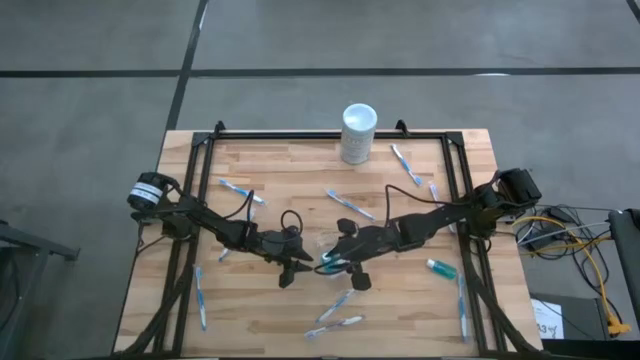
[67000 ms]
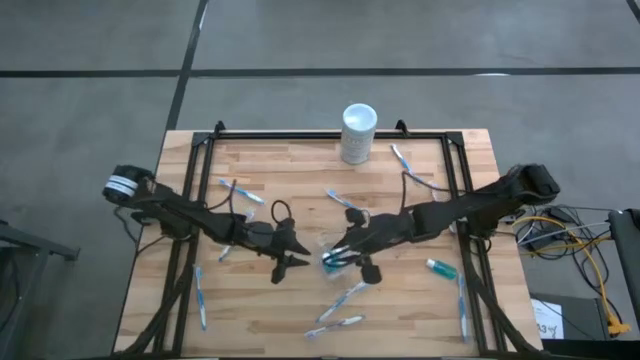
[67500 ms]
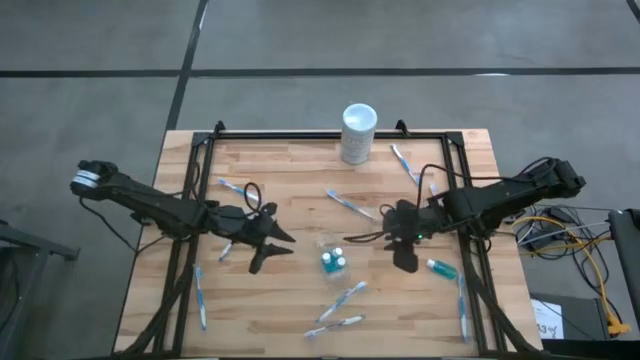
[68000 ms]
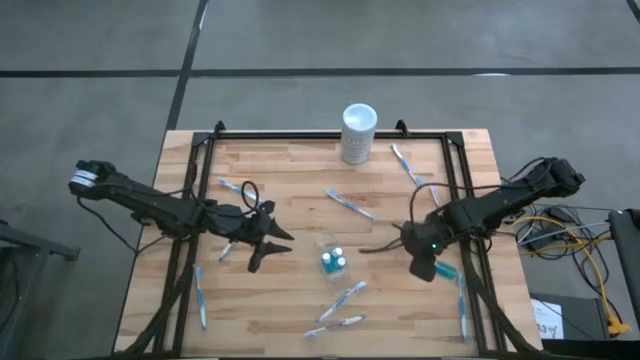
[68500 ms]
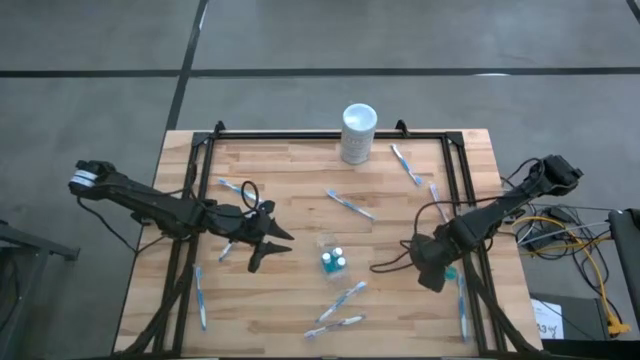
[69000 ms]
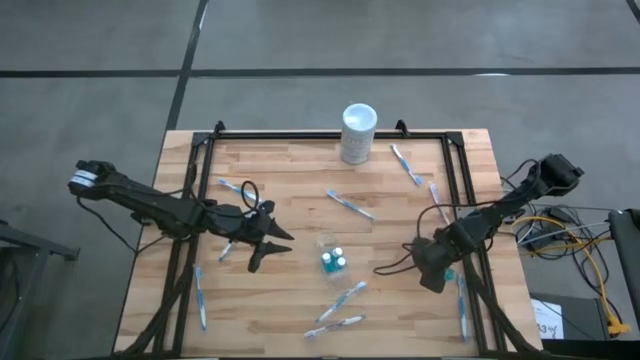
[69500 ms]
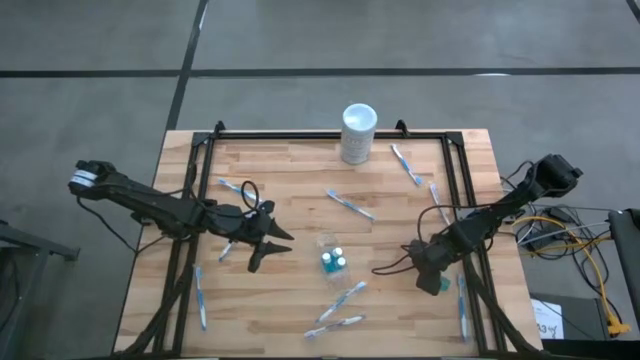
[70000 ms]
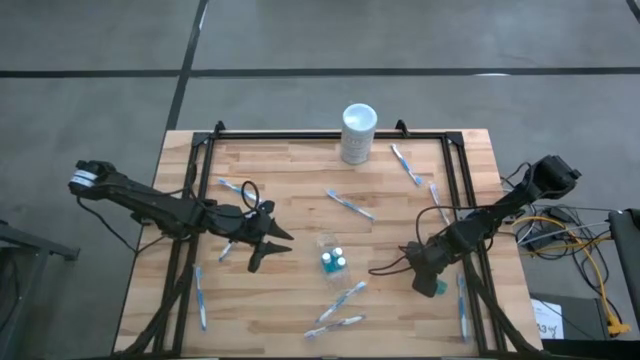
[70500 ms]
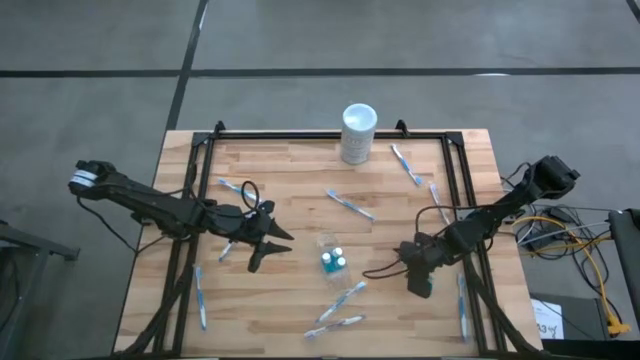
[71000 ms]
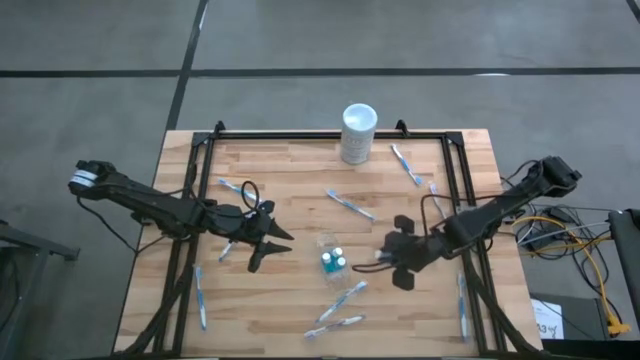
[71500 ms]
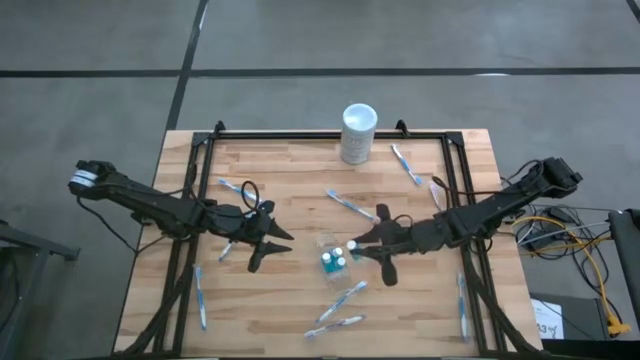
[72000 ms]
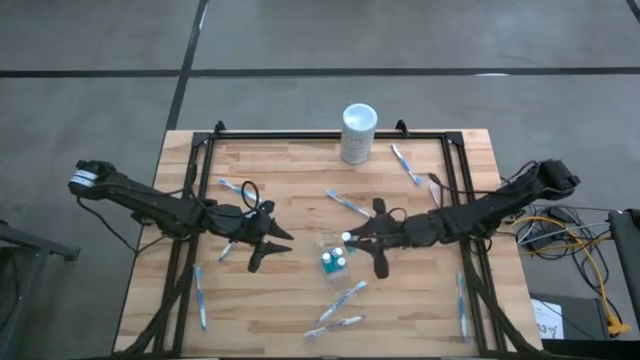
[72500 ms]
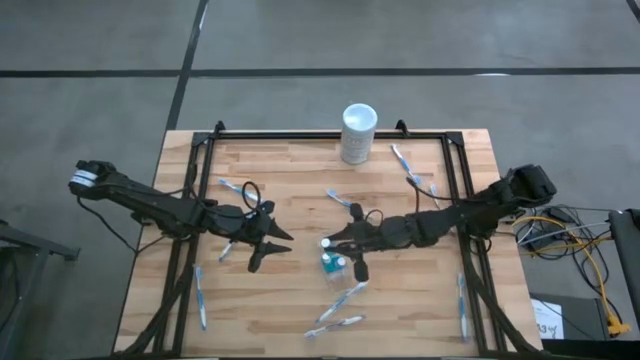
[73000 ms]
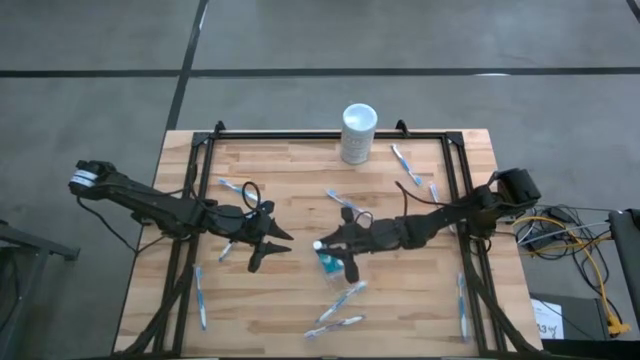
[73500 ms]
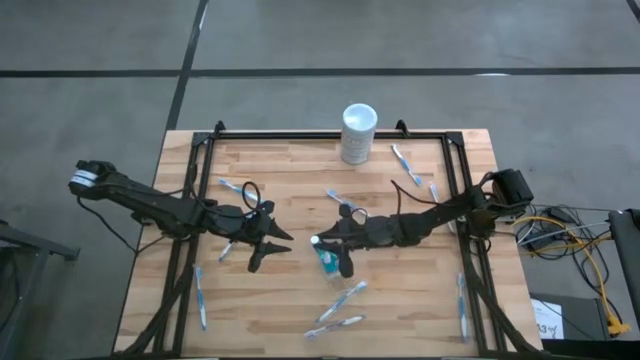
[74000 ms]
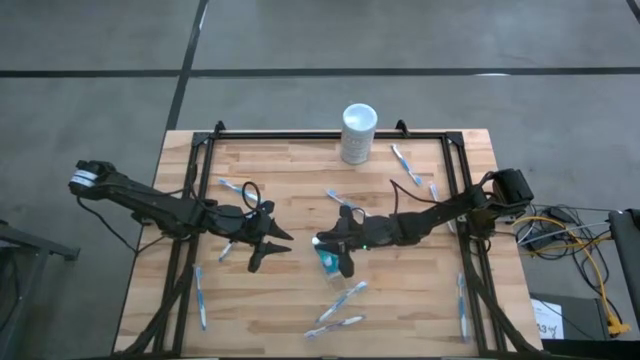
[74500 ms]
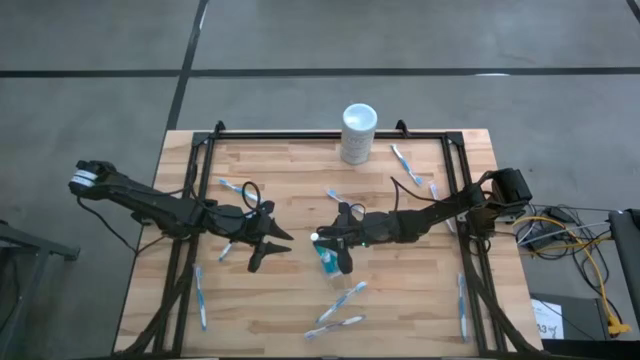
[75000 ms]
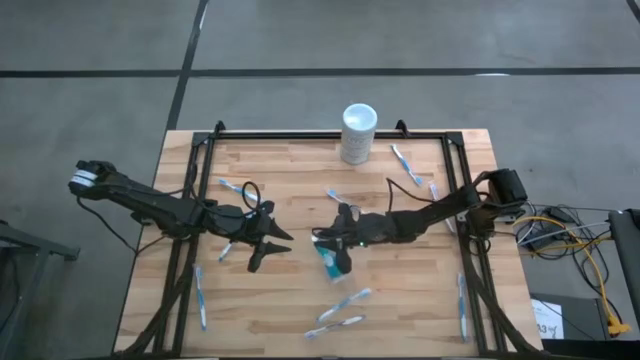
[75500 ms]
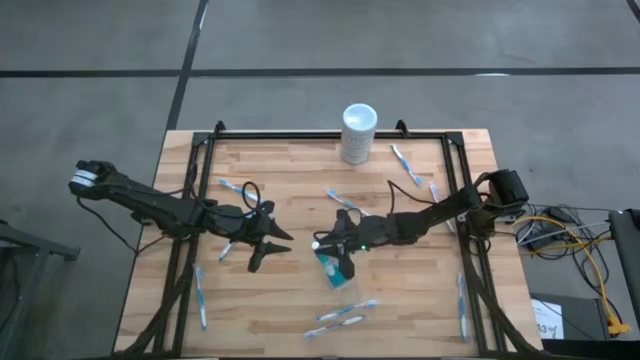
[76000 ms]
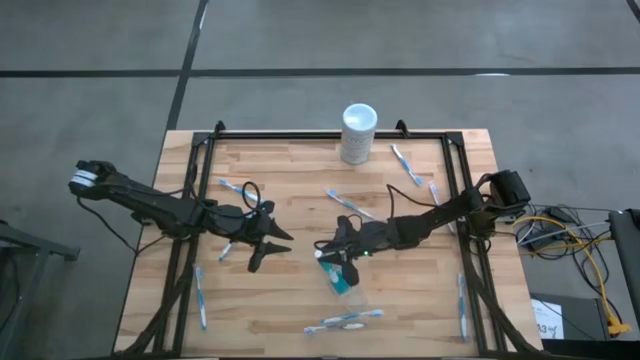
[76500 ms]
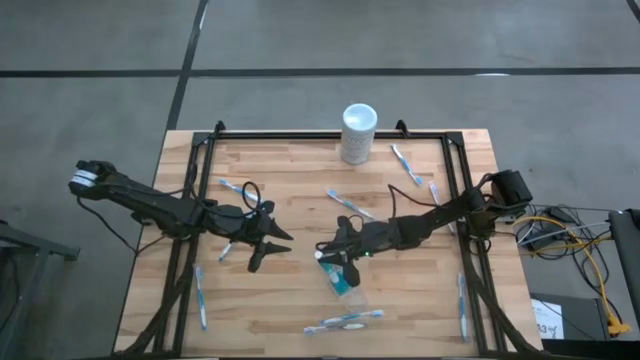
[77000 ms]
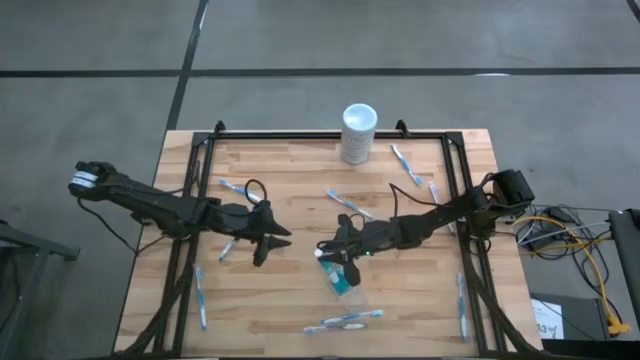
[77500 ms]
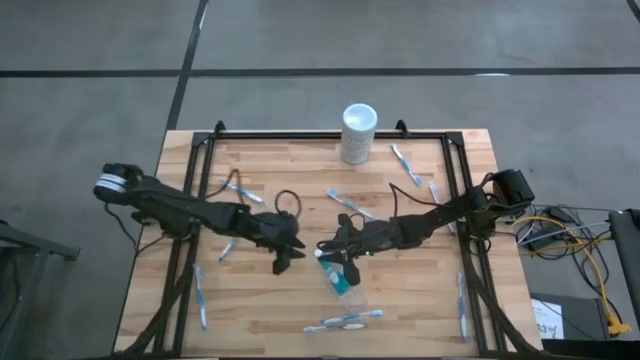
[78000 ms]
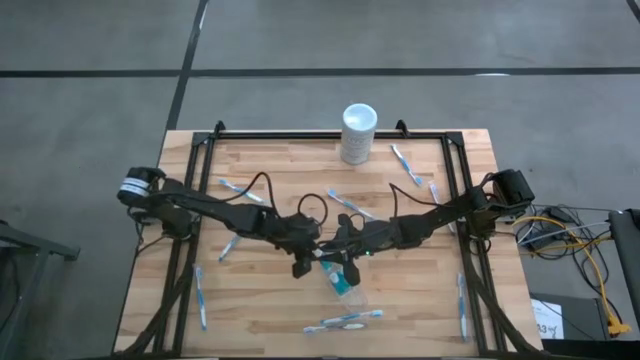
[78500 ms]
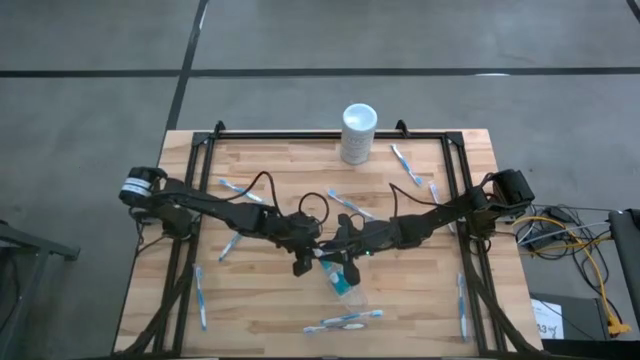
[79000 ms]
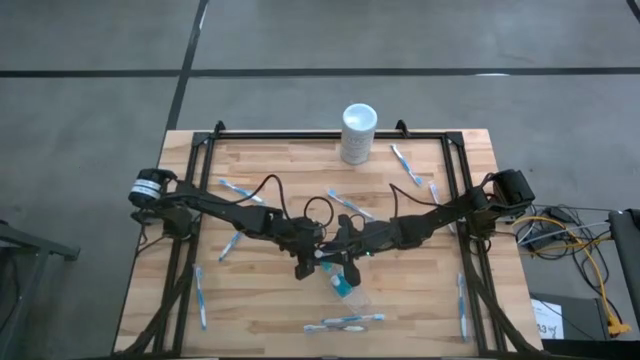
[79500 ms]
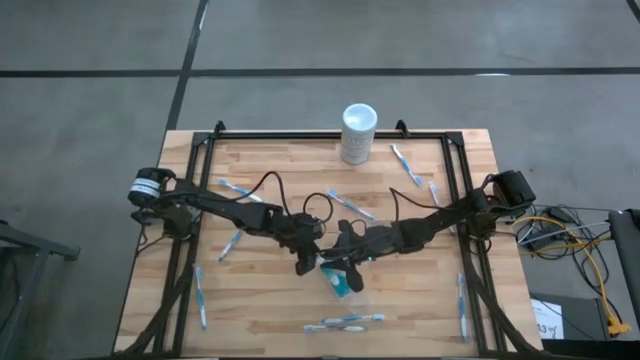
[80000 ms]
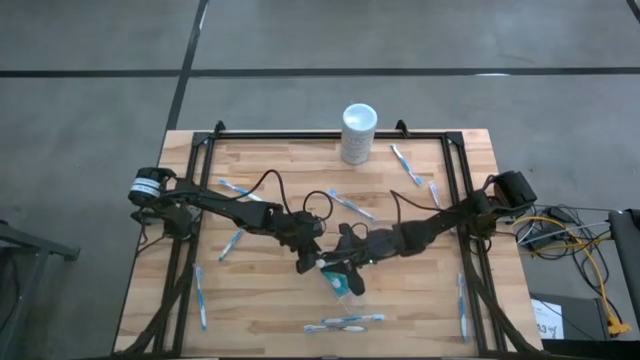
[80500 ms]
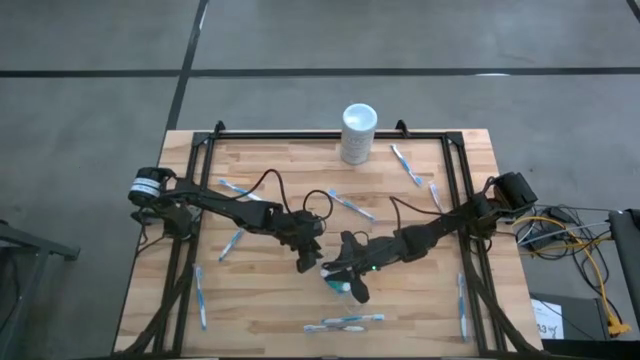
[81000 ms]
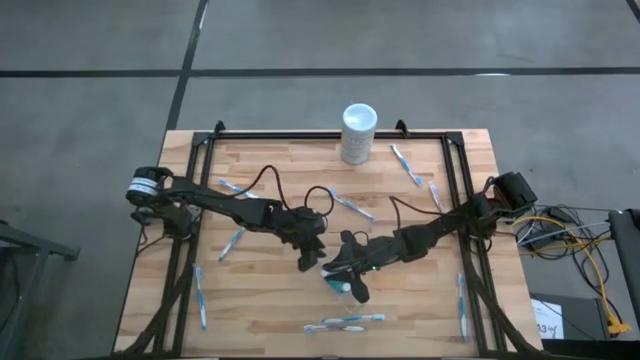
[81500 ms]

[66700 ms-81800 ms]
Task: Pick & Place toothbrushing station
Put the blue mouthwash bottle into the transparent organizer

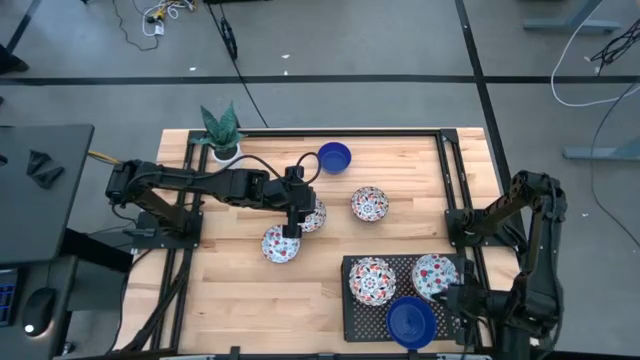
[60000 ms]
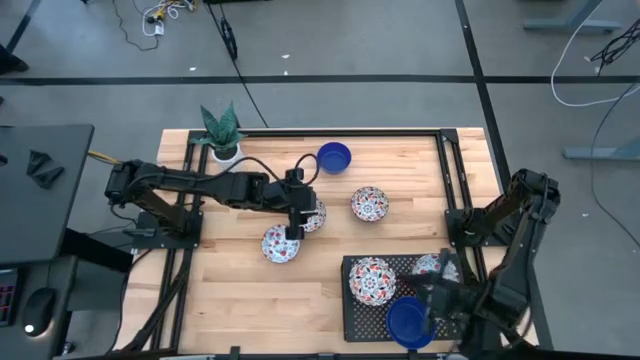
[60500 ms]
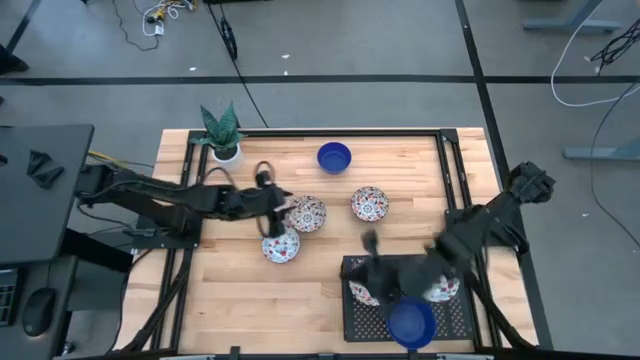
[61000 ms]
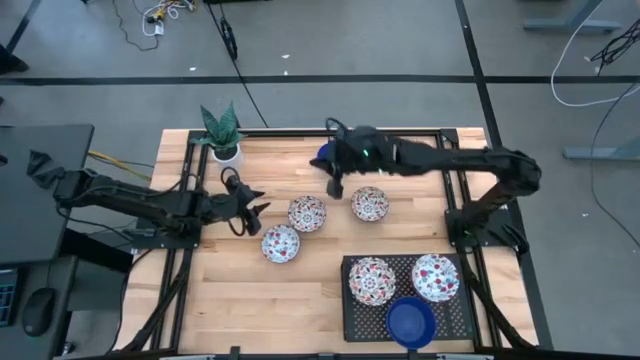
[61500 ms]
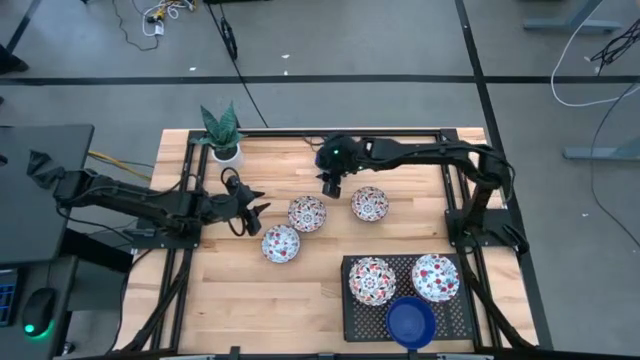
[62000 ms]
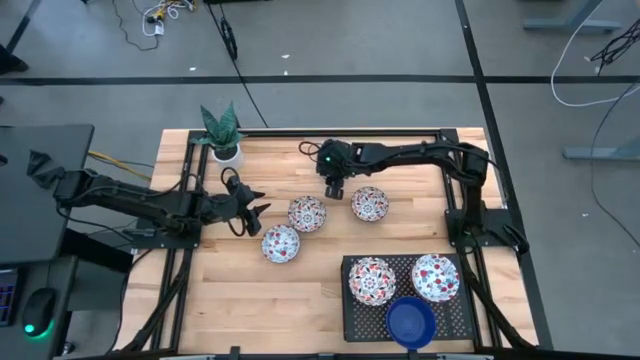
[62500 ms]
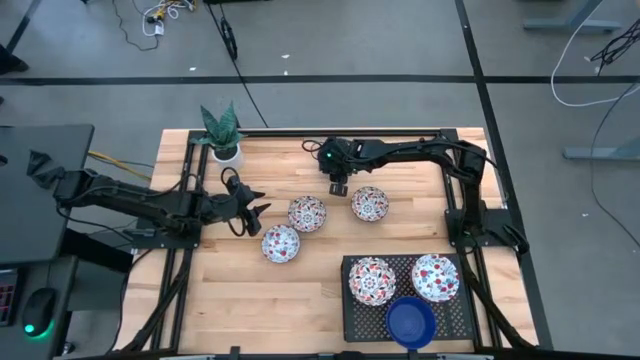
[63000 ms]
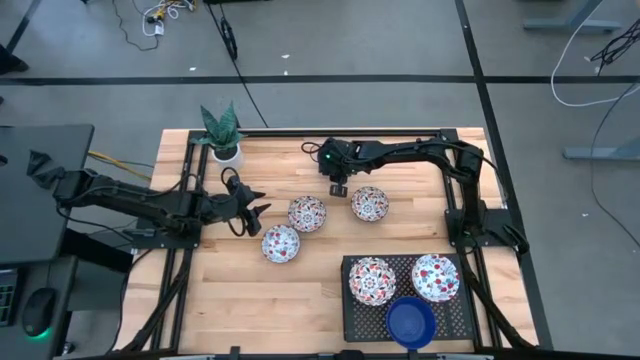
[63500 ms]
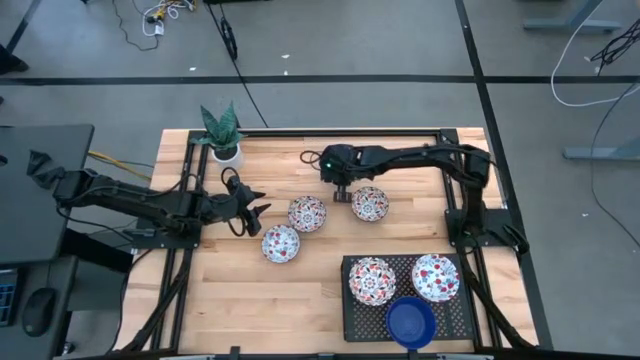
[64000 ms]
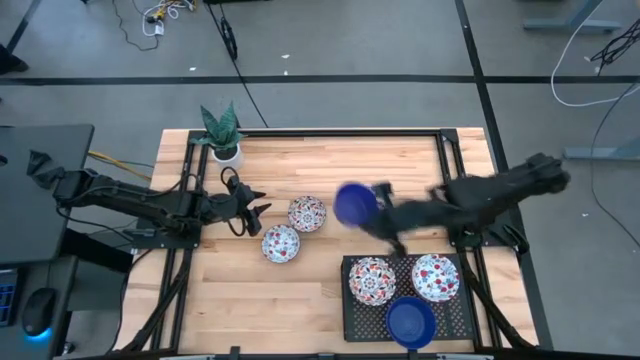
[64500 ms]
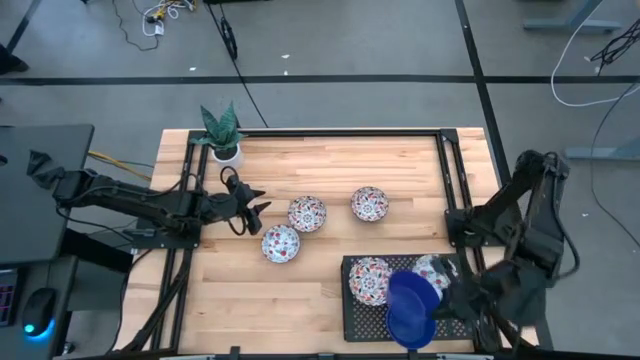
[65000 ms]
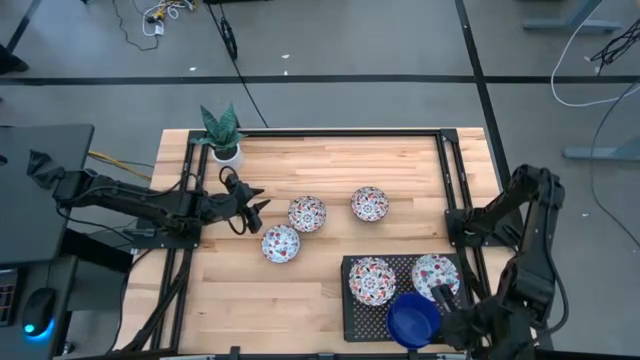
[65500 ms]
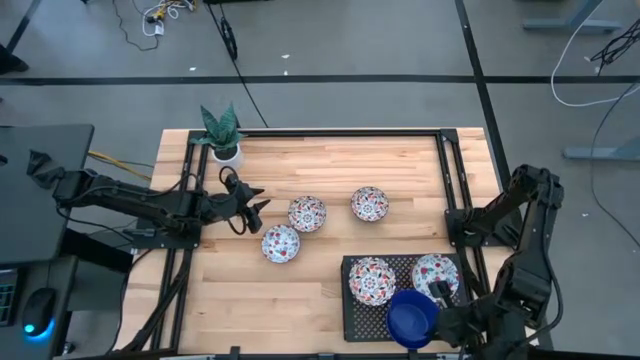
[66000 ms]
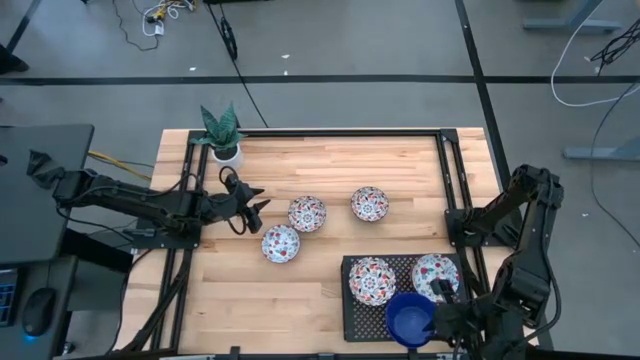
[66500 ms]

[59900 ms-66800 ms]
Task: Pick & Place Mini bowls
Stack the blue bowl on top of the stacked blue bowl on the shelf
